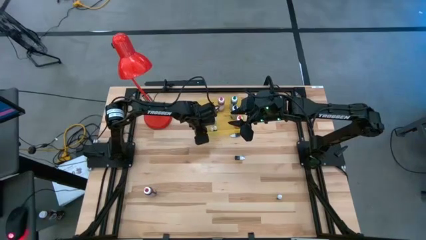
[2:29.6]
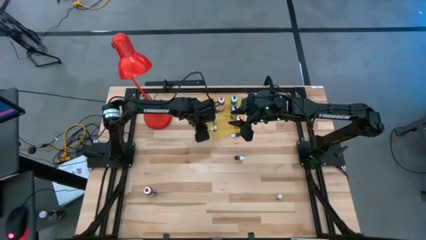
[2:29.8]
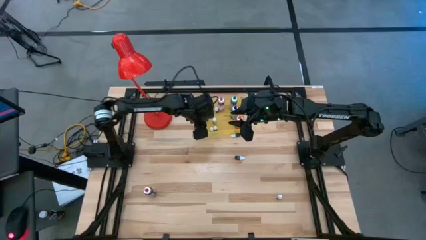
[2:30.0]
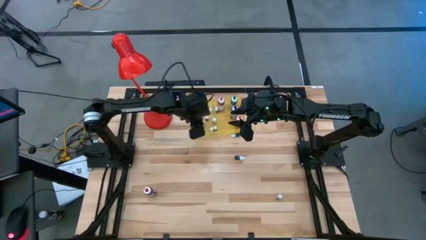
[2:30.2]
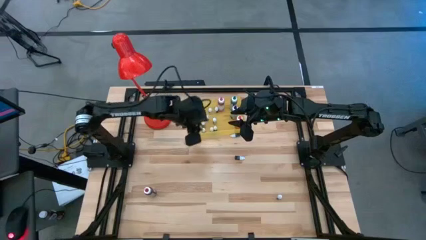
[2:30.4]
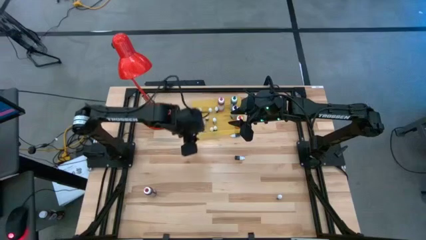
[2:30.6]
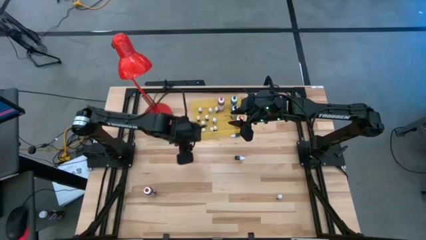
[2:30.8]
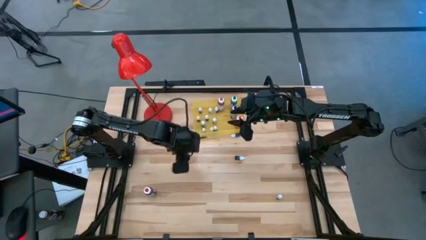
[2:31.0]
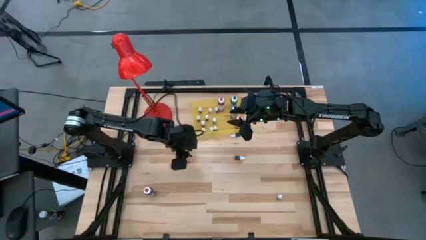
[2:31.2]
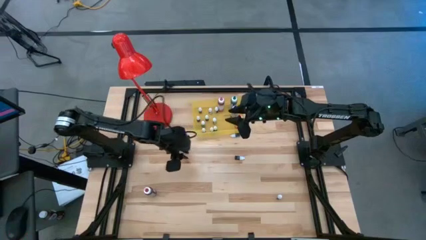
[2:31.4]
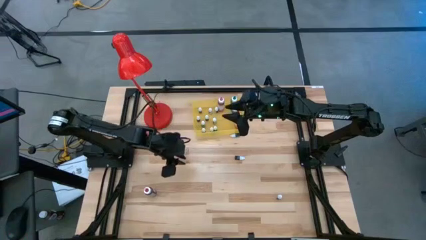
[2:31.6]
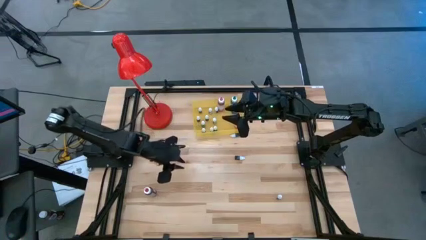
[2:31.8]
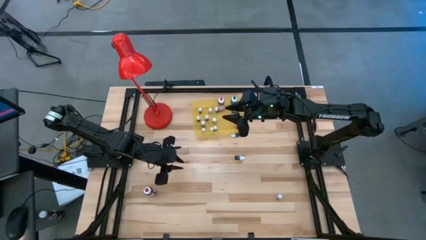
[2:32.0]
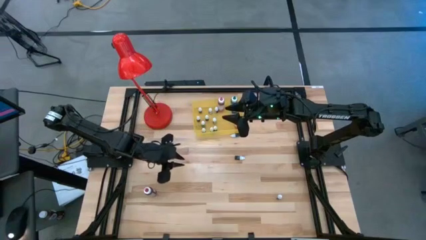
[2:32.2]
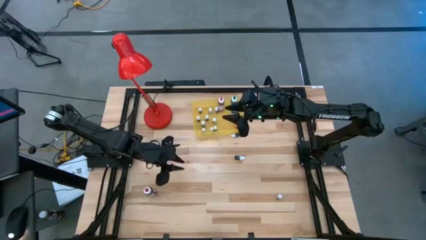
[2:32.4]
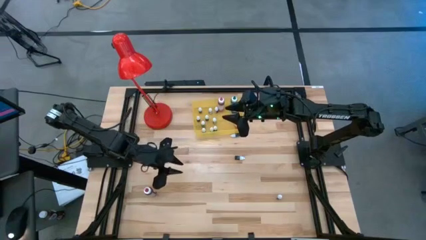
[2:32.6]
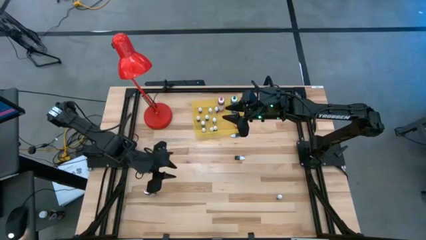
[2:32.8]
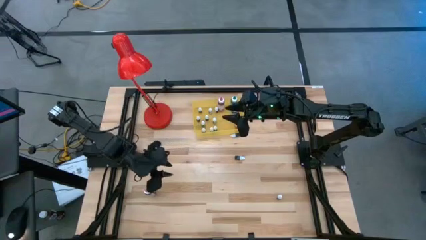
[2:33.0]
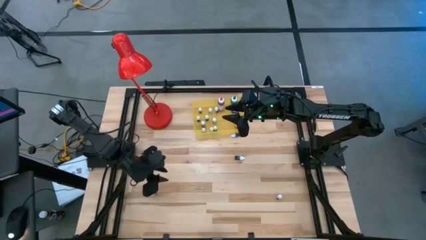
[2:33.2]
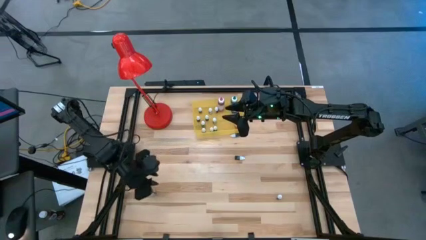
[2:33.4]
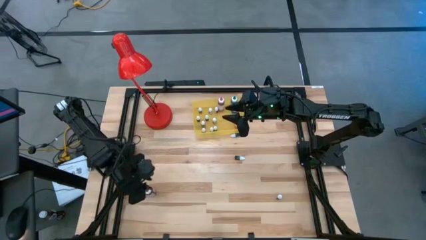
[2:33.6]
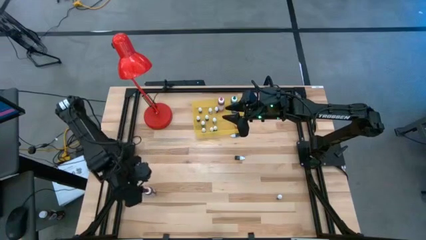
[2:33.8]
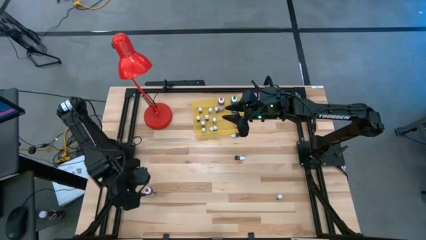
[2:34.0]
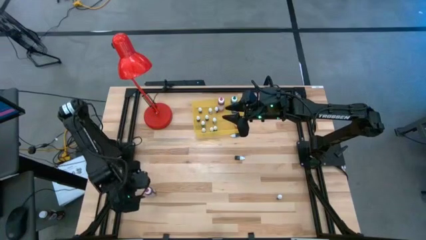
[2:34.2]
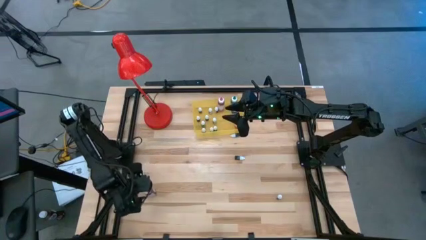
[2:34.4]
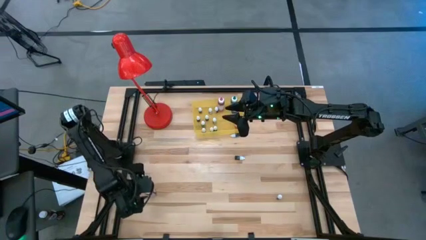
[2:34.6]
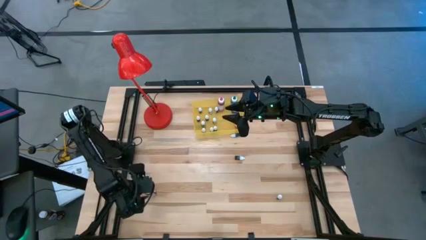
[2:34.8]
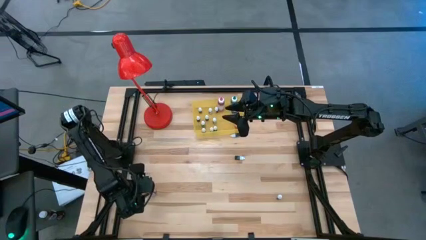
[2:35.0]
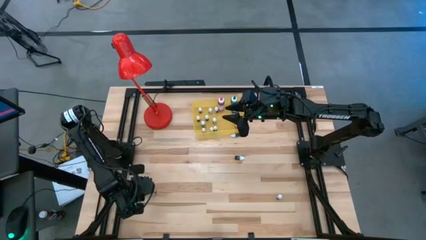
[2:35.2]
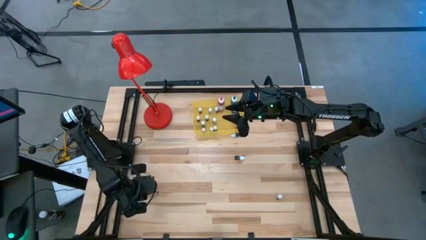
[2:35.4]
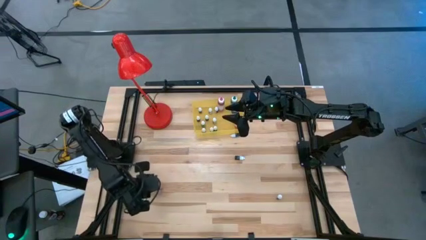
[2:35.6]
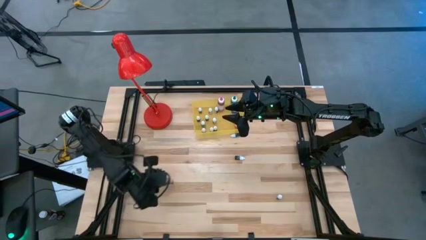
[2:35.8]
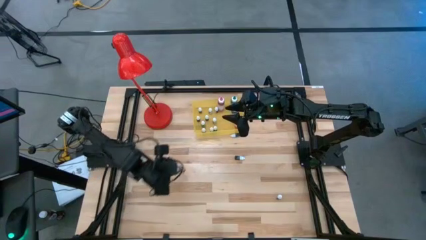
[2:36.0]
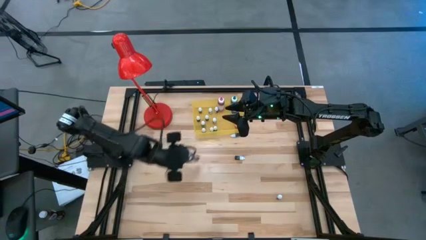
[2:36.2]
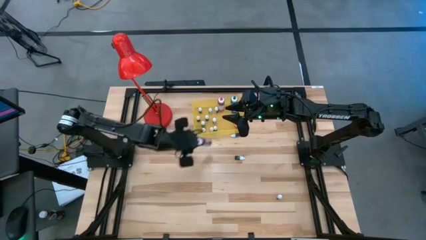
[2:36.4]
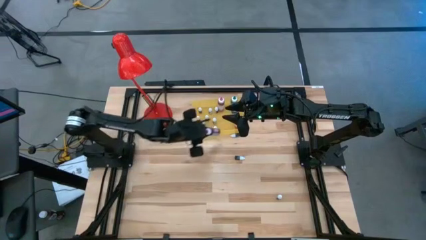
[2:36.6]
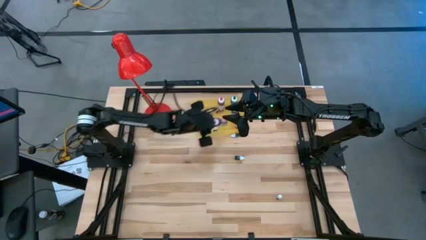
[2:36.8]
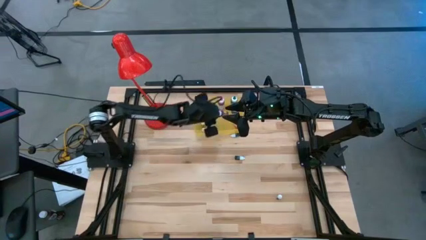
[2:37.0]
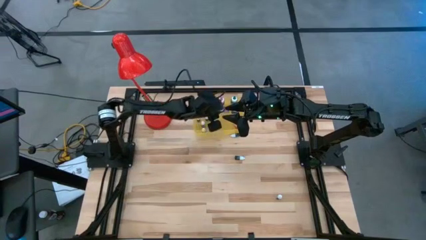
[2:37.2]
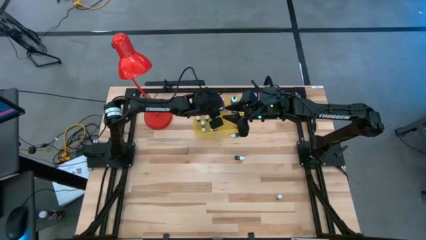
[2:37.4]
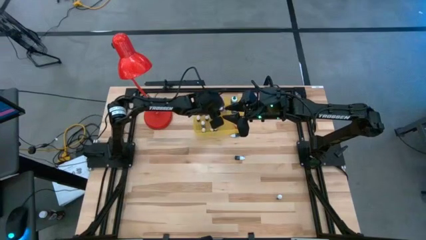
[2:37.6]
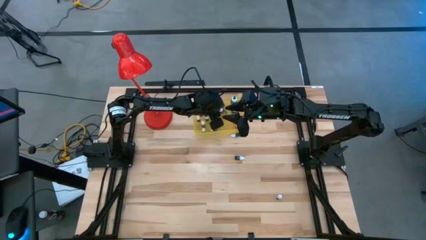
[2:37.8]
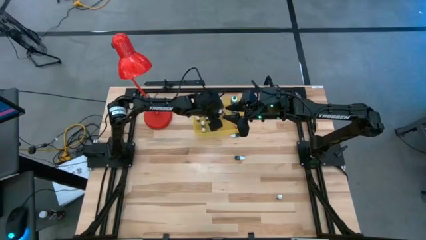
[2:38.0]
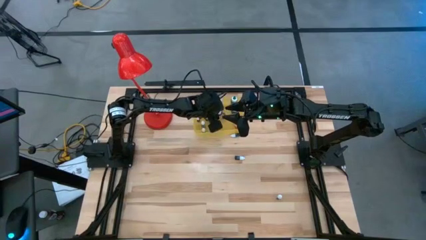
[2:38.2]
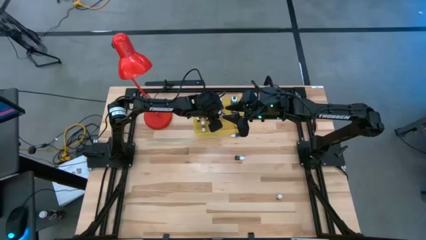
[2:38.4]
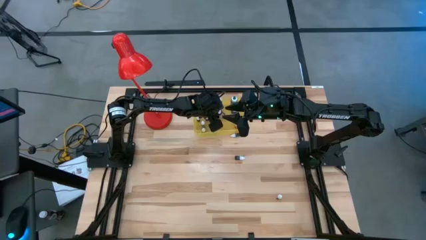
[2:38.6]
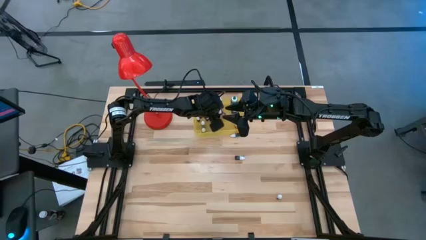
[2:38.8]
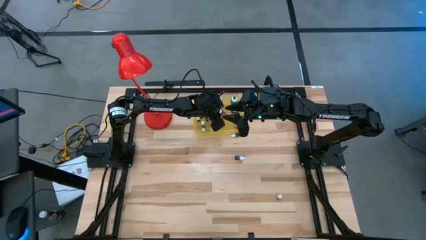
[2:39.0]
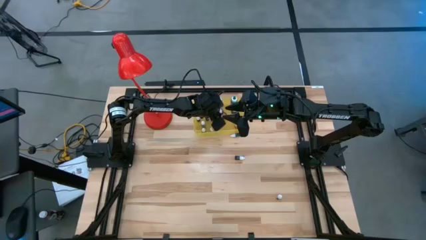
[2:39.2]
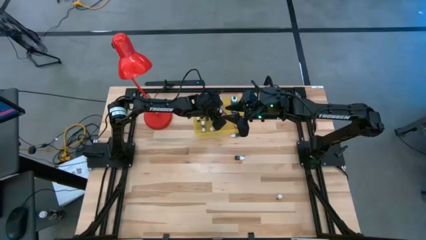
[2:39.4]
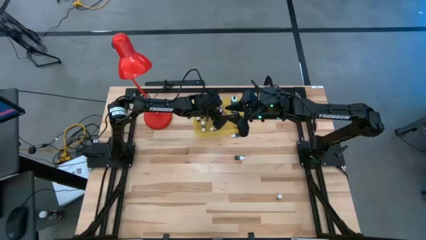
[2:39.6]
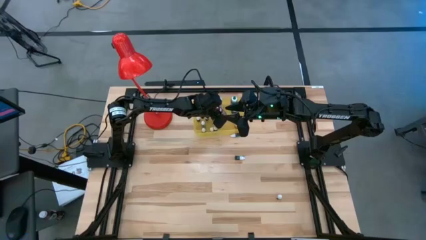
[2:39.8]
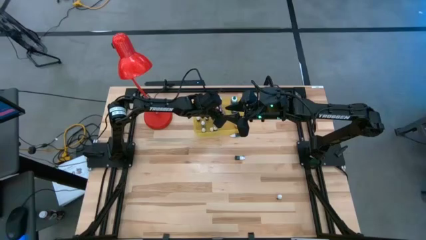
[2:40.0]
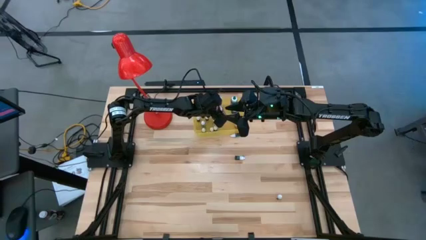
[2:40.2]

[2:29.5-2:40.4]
Task: Pick & Place food coloring
Put the large red food coloring bottle into the yellow bin
